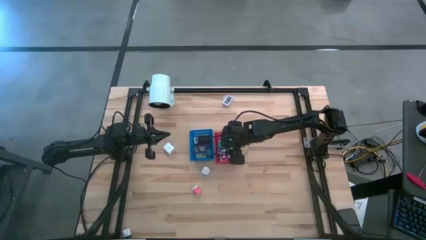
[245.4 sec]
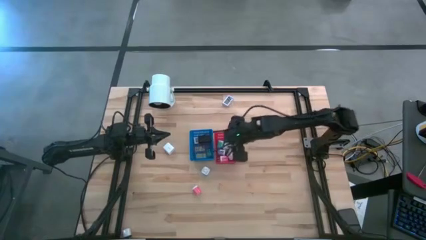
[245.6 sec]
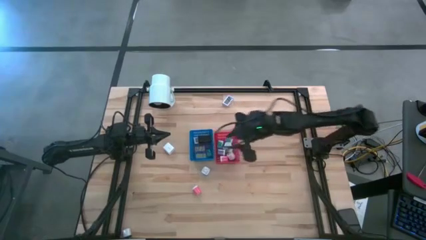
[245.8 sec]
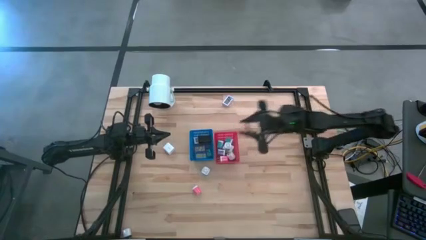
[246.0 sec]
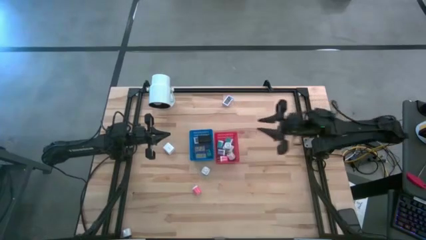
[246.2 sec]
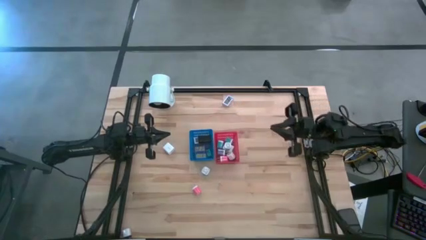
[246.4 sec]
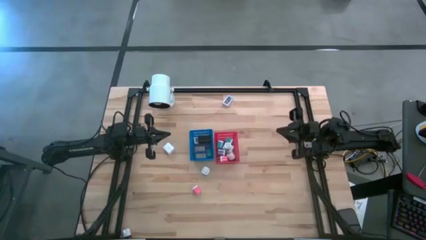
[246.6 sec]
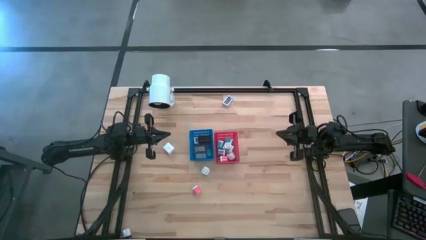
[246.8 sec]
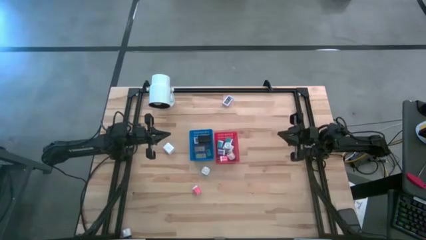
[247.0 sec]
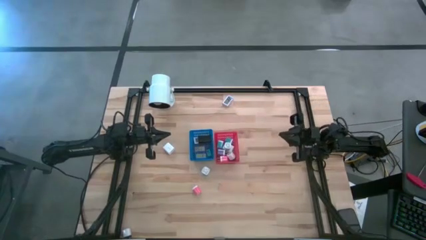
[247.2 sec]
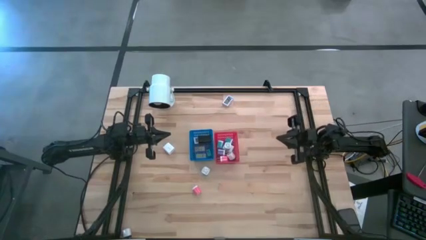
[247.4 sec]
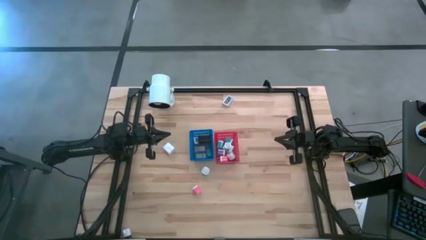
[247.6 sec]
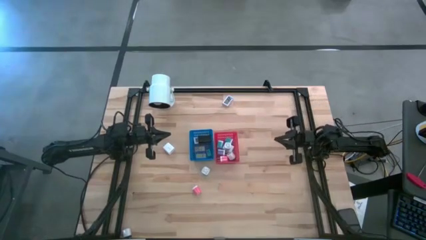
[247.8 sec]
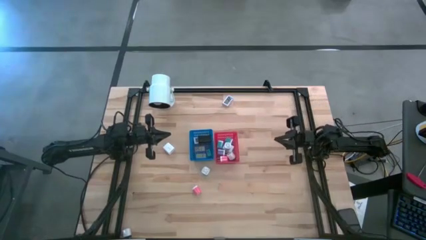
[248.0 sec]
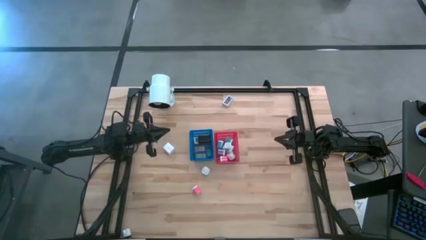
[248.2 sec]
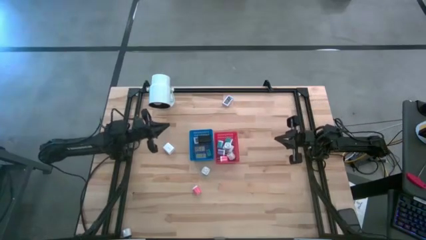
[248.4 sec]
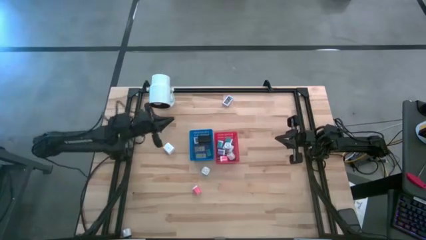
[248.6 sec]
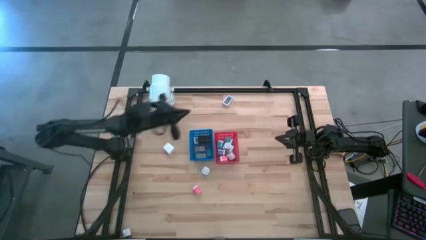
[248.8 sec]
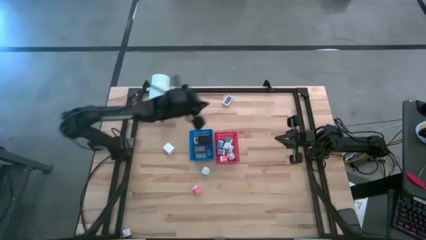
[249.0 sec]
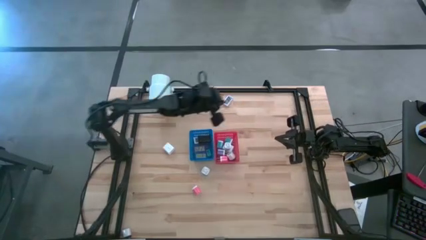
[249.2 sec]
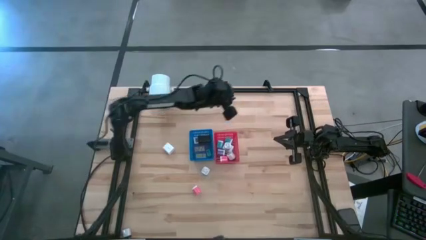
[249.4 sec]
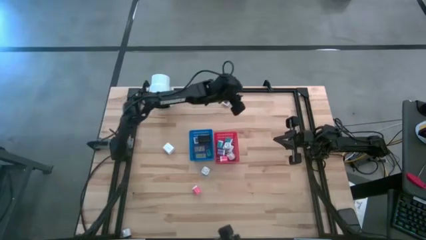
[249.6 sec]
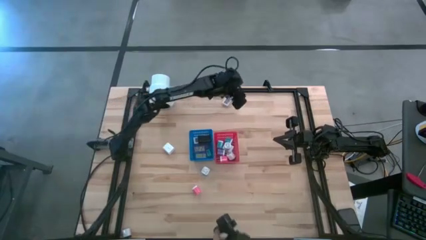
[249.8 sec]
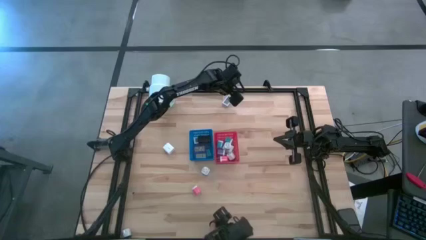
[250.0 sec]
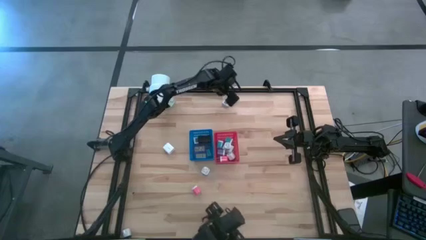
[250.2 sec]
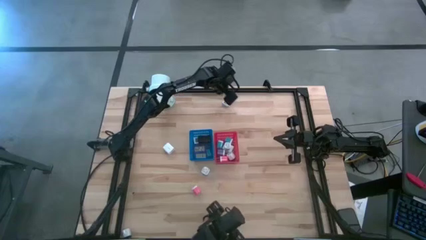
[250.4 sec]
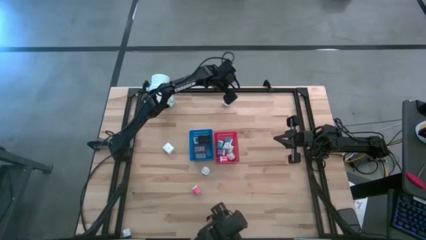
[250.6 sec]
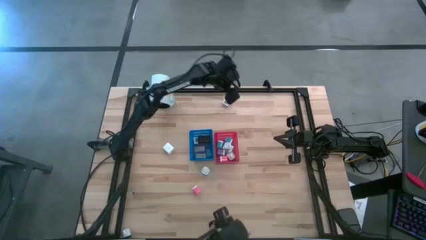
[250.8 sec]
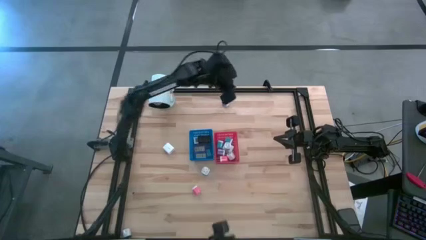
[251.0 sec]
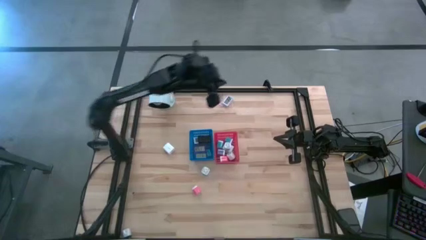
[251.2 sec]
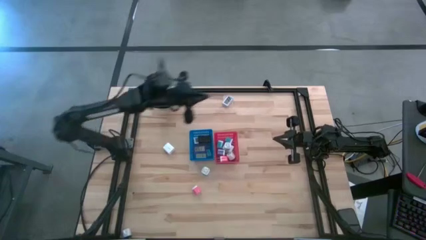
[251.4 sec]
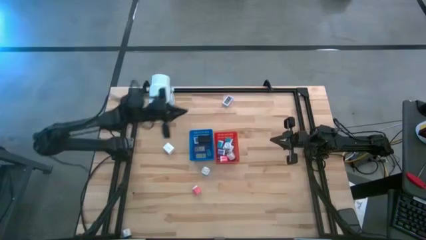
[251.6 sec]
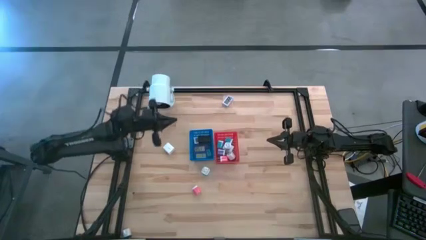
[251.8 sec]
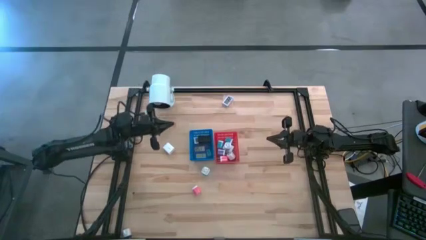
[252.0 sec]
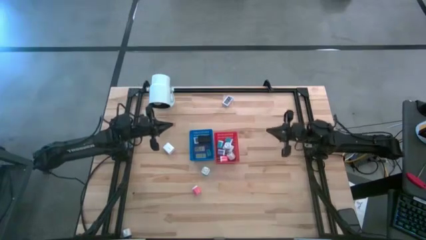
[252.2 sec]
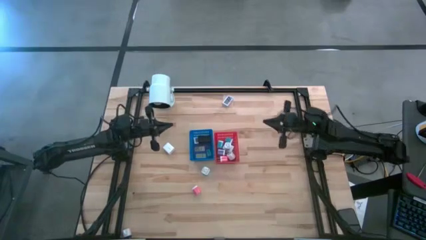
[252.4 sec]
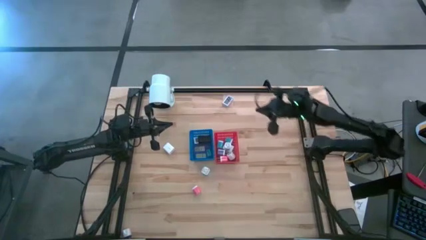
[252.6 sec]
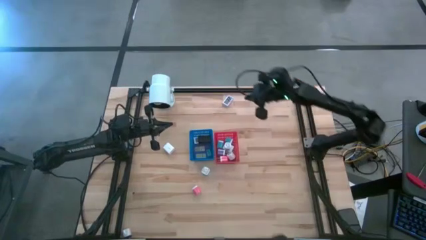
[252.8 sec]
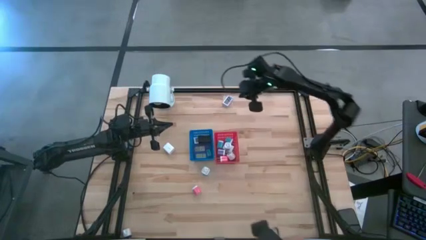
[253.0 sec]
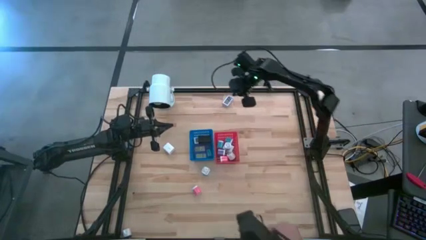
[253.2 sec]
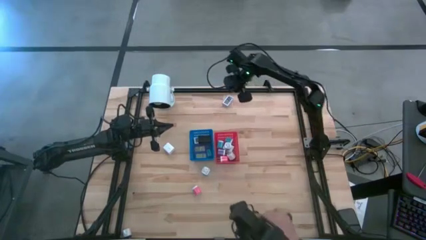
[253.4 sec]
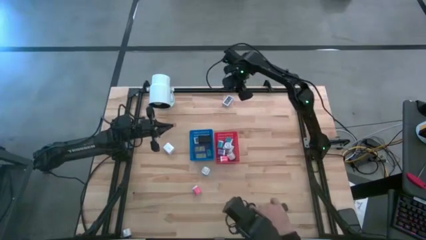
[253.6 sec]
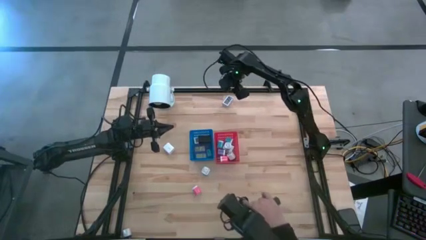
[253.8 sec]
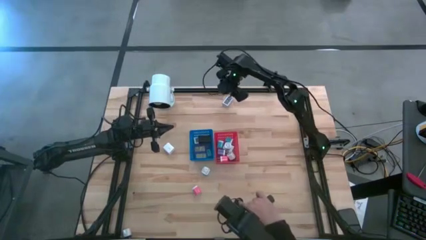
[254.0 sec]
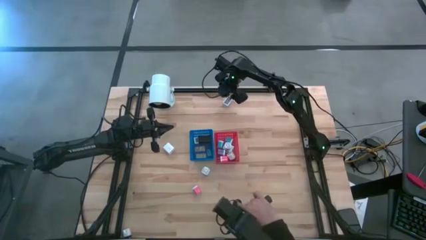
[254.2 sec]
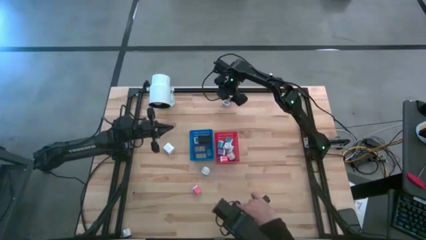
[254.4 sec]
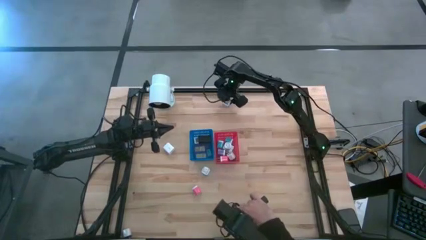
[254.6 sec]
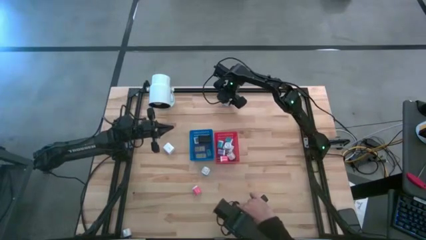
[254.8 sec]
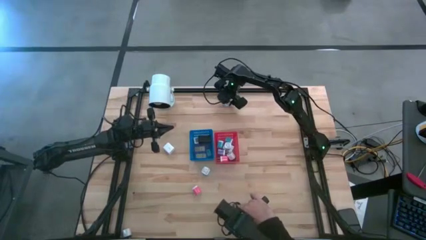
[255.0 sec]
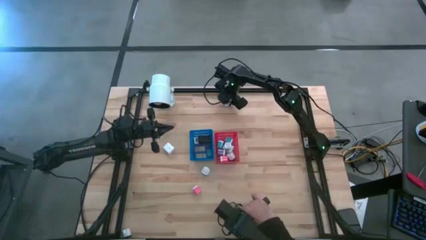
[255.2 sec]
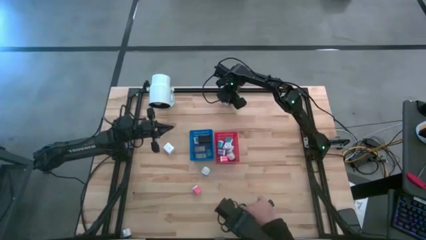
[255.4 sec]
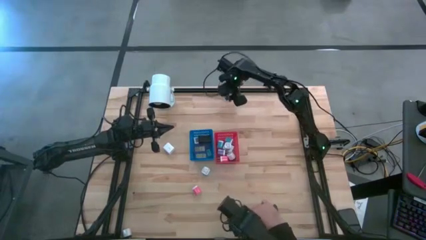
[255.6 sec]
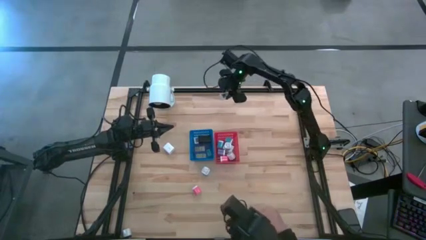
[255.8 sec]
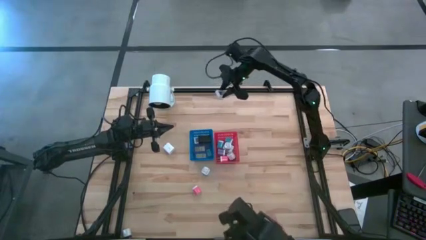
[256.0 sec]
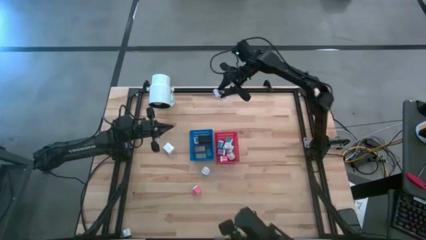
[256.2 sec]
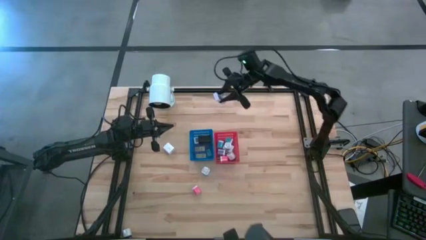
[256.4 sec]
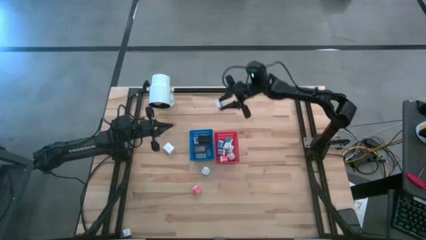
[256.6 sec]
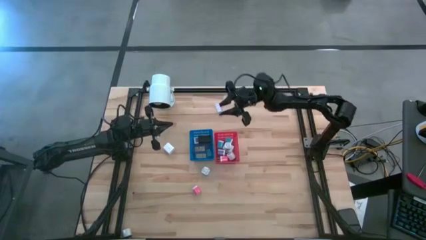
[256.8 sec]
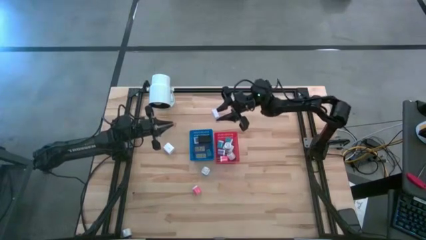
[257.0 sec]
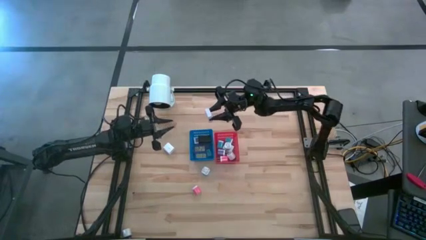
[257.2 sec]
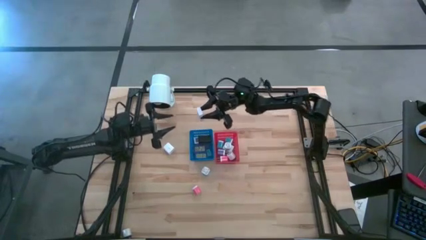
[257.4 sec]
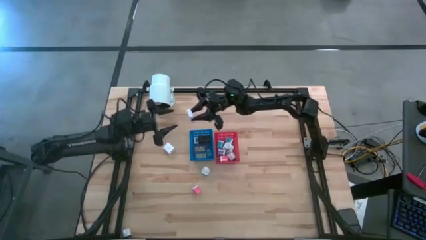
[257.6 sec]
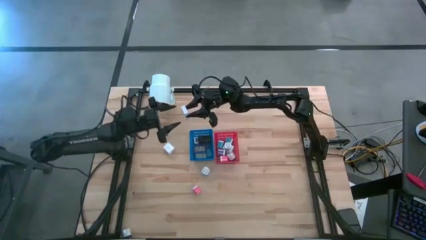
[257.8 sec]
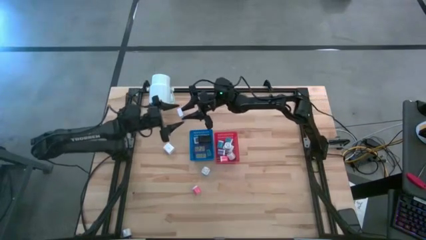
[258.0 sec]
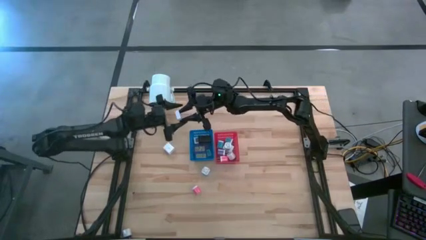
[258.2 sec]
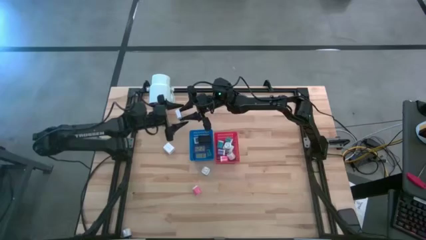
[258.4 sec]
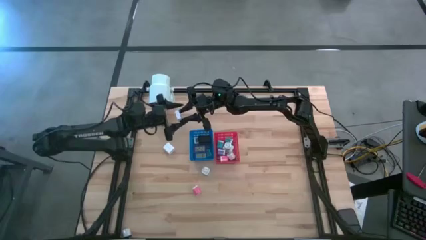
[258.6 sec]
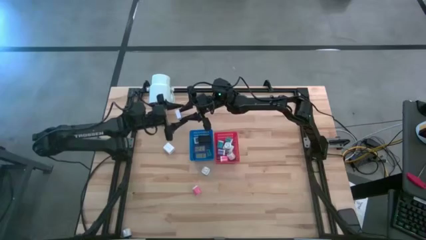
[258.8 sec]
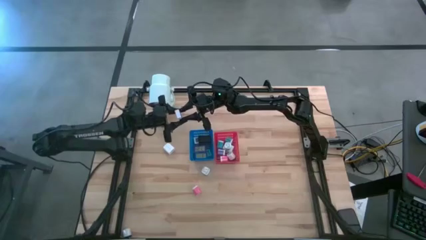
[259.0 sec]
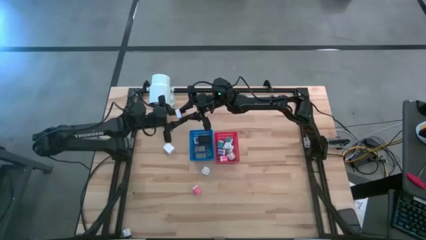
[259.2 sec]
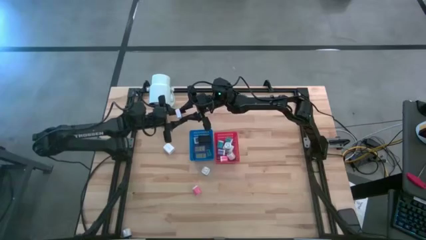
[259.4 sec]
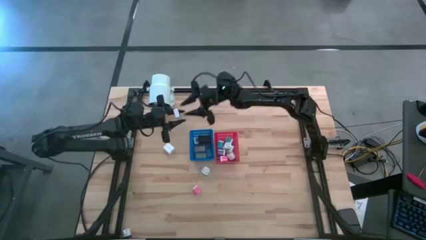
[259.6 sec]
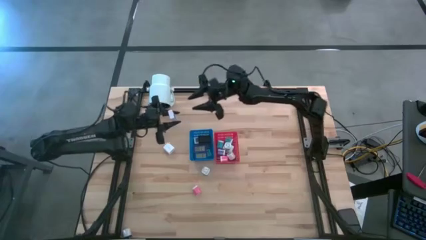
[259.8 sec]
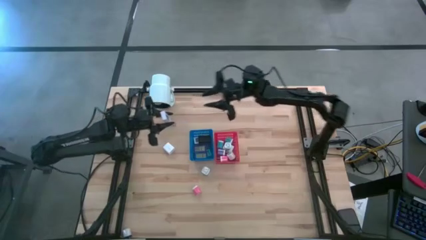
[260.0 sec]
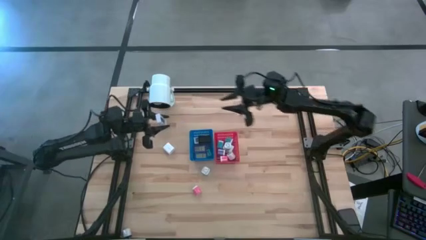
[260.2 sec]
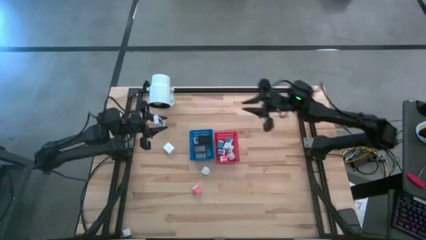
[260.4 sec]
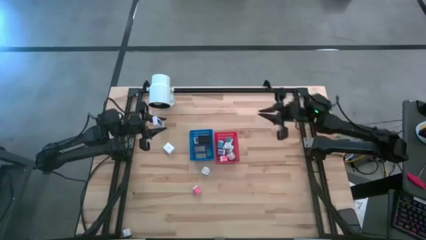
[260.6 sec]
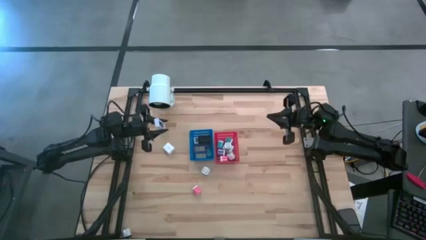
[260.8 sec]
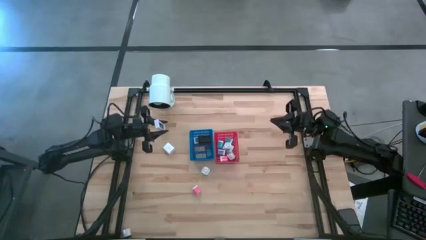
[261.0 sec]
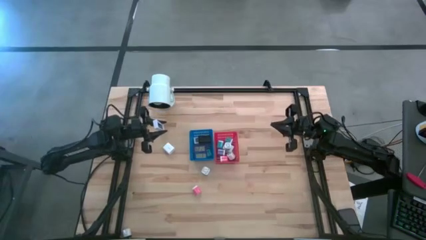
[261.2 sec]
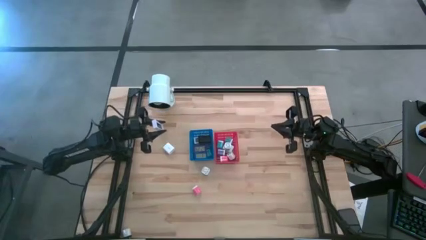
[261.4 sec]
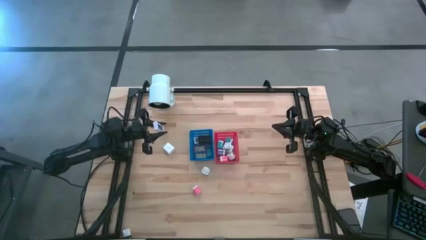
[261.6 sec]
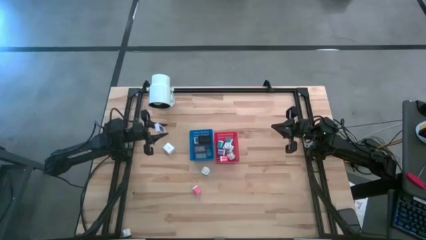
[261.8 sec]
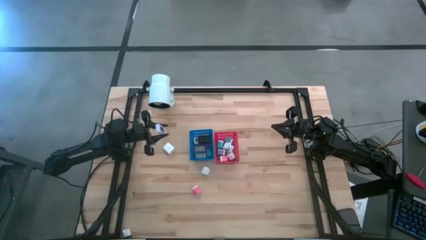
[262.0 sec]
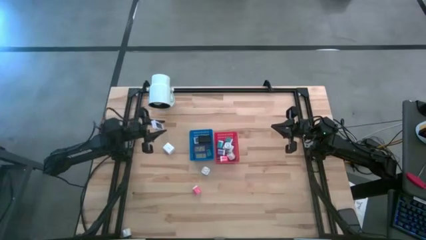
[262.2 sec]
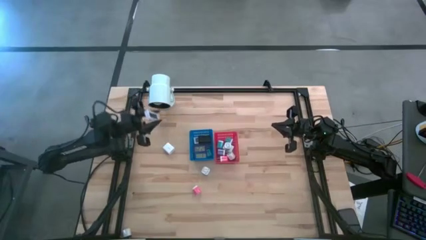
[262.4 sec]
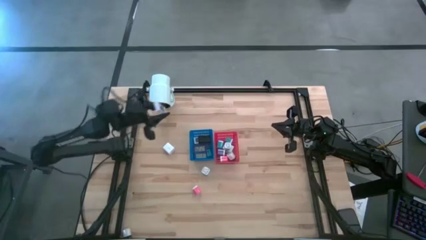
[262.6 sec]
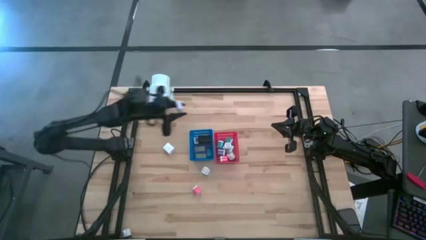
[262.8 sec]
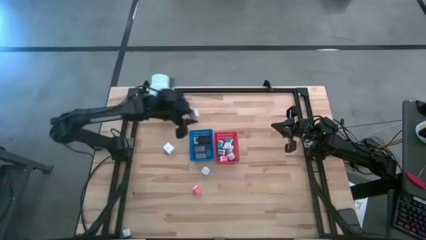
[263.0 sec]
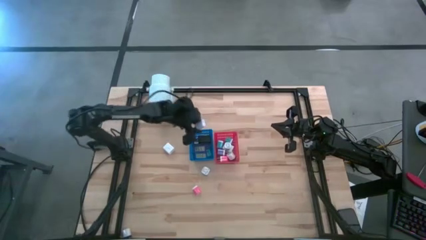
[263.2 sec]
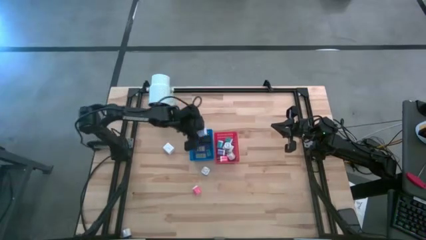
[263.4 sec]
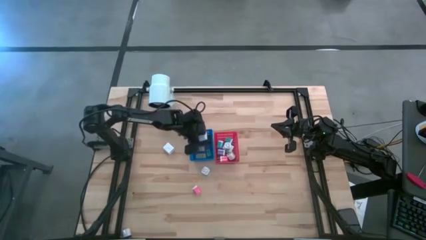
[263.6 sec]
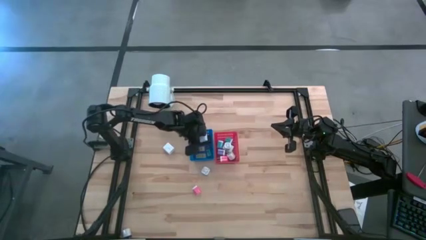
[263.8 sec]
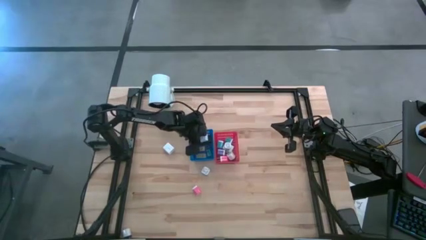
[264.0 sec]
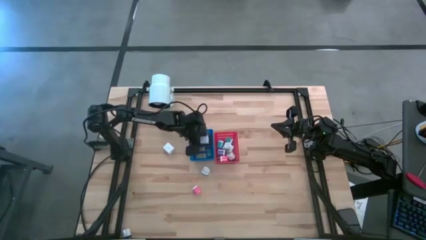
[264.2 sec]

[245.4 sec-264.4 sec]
Task: Pick & Place Office items
Put the white digital clock into the blue bin
